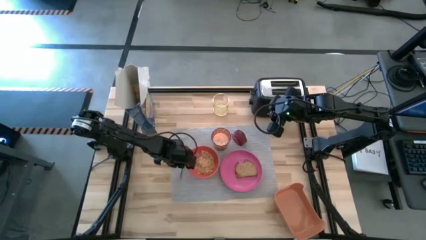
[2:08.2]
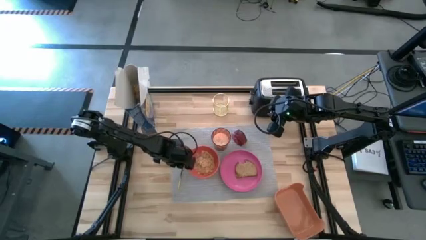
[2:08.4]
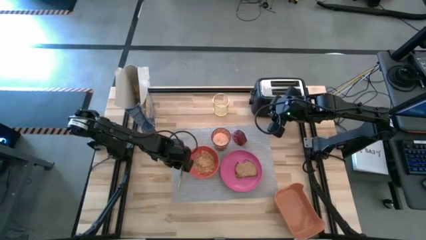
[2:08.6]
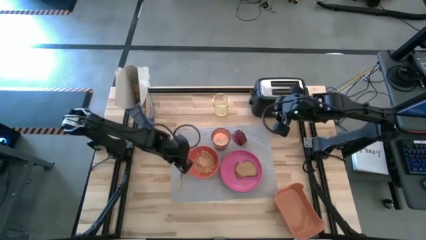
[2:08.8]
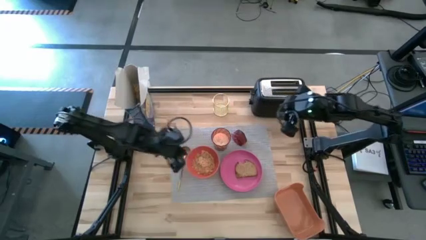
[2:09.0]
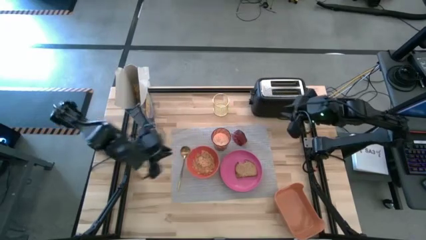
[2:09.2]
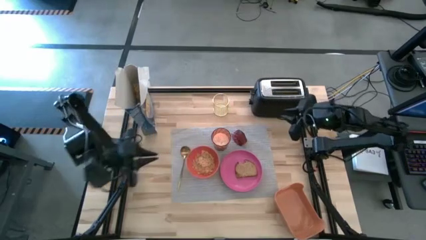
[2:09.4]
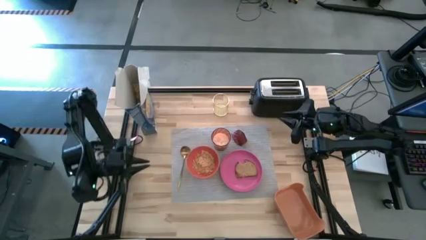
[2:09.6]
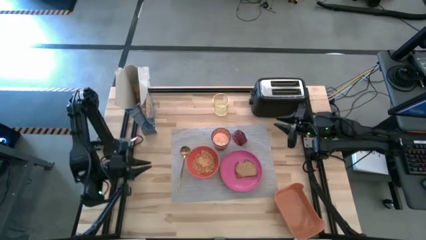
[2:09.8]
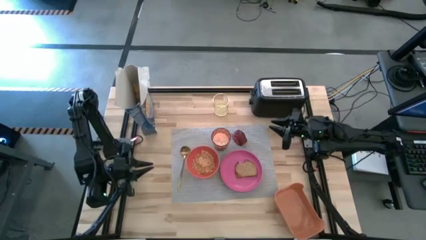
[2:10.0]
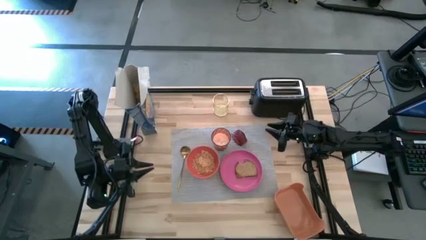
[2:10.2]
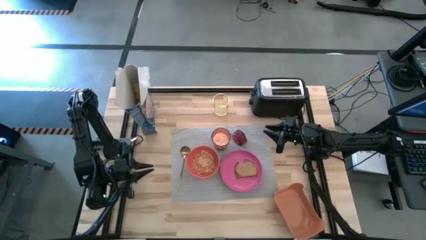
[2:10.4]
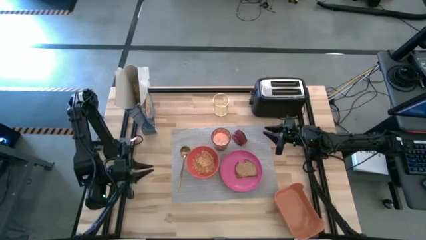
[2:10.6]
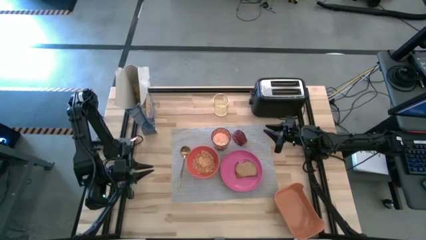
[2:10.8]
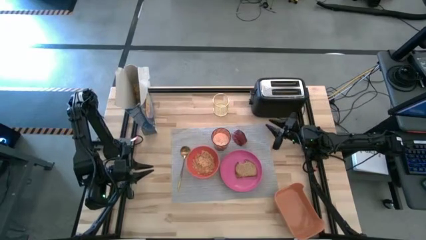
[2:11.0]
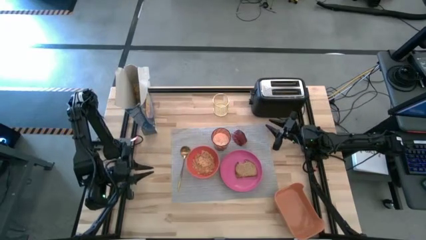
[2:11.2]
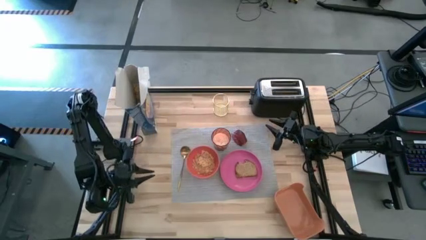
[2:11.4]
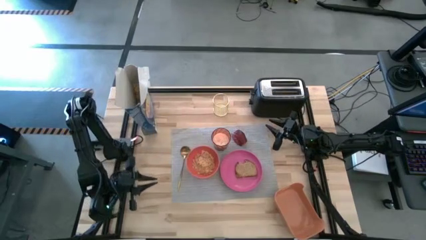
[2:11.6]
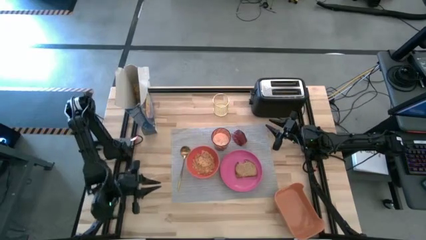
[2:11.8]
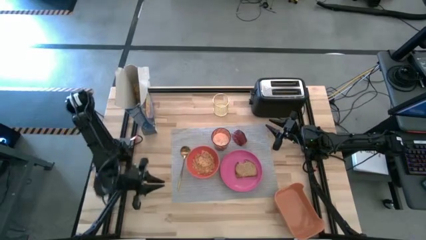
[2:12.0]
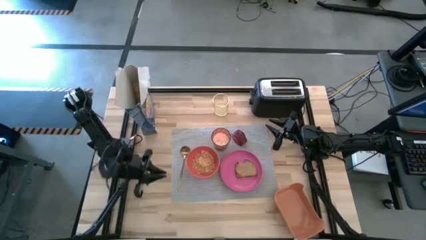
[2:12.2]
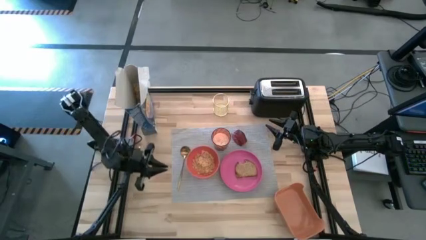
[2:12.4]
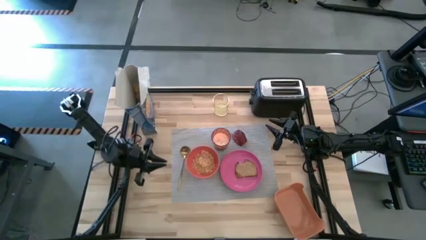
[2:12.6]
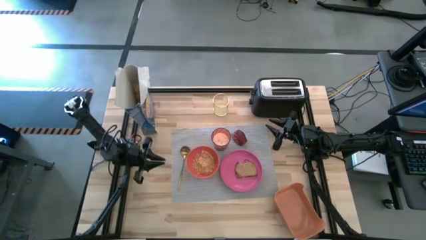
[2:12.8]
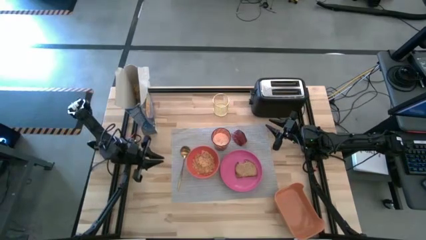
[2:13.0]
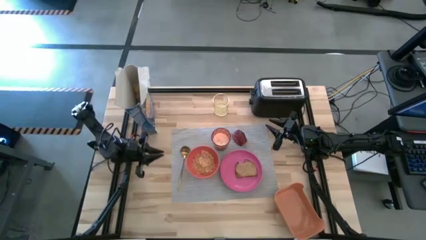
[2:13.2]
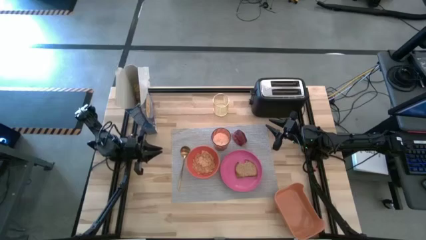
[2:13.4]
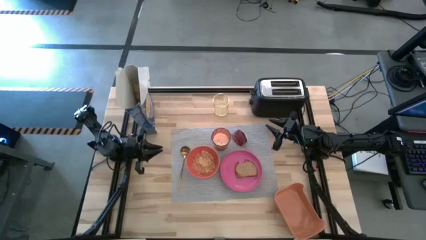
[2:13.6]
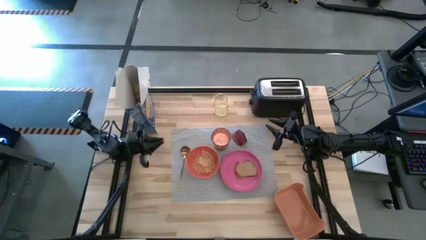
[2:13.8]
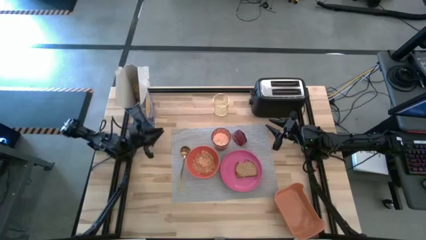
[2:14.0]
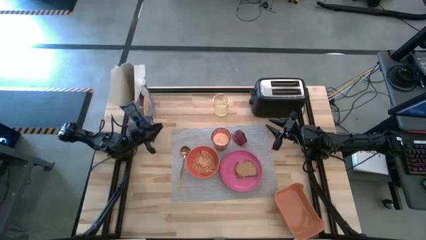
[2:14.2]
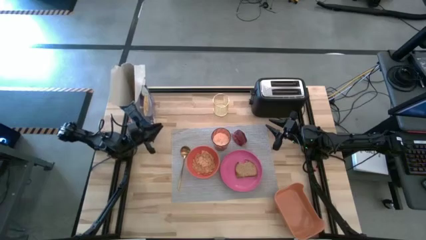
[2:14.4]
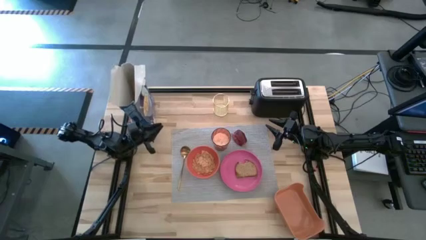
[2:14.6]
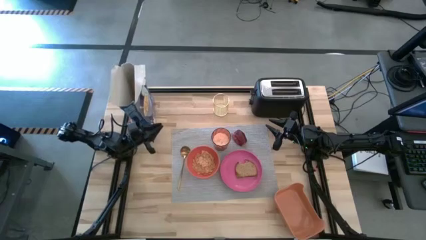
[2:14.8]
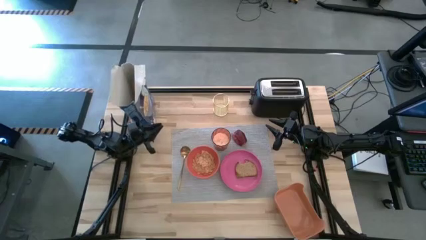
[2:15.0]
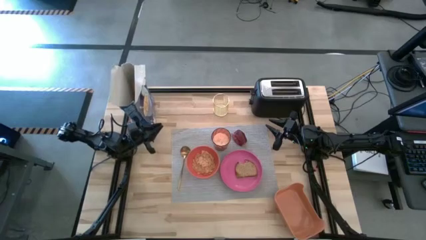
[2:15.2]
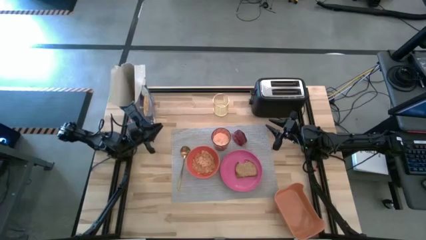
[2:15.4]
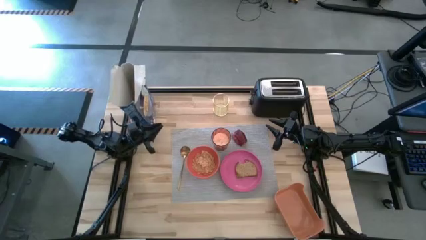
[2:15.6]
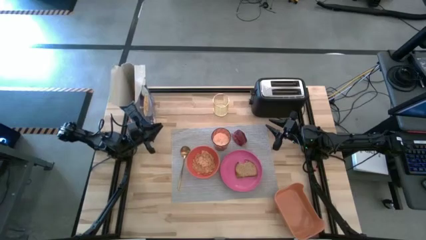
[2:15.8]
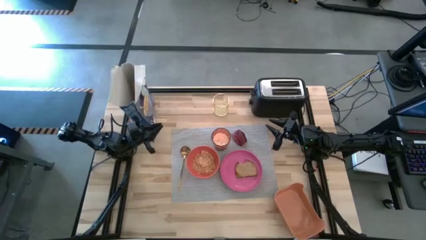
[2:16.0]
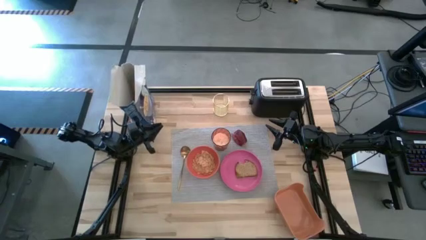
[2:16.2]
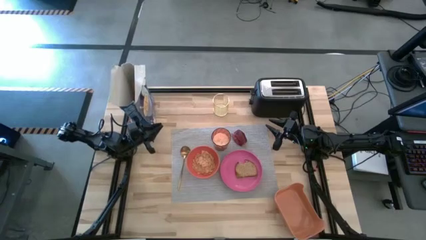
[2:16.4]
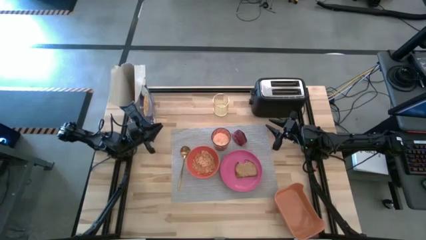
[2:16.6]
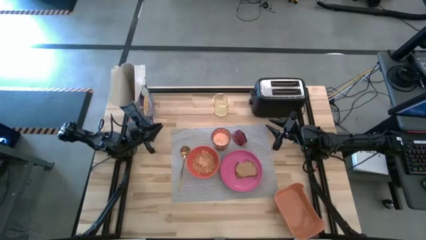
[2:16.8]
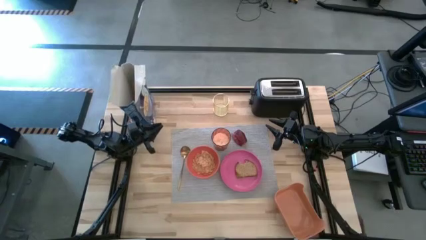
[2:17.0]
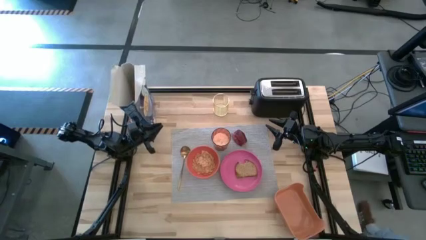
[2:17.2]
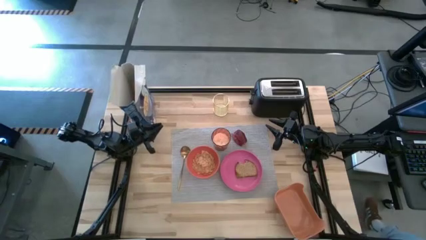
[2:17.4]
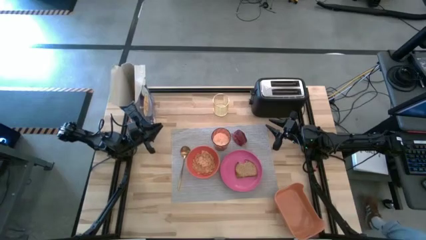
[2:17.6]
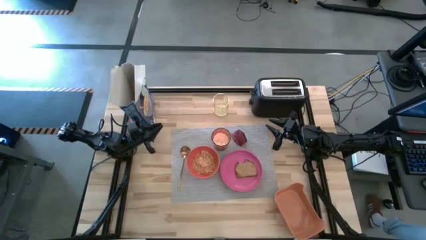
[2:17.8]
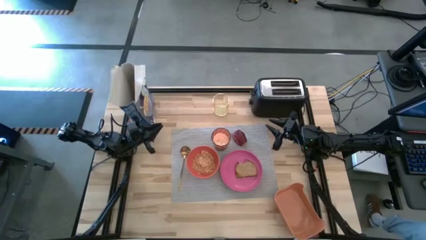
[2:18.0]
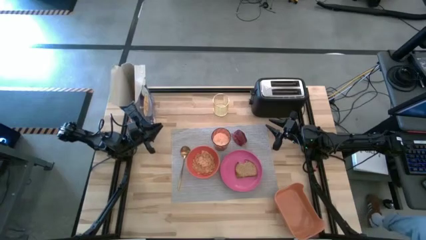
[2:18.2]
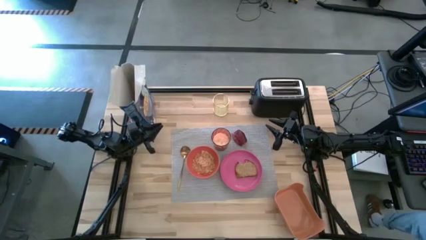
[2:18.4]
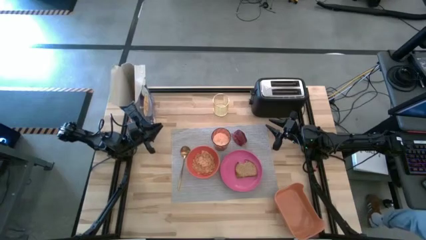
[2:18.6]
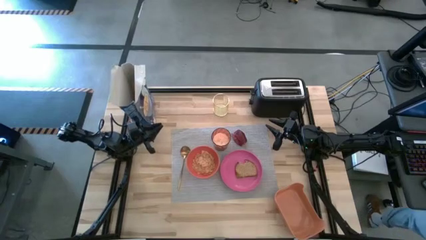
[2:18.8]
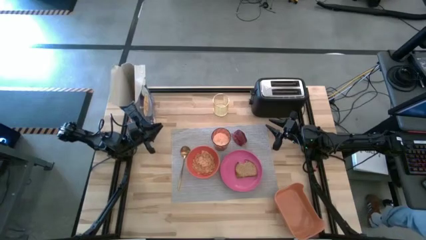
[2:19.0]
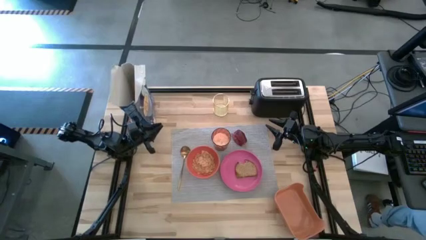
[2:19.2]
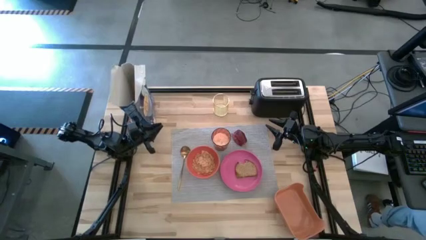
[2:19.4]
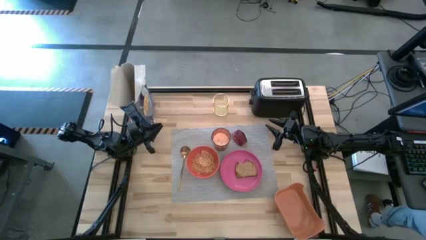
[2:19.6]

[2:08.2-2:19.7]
Task: Arrange a breakfast setting
Return to Home Position
